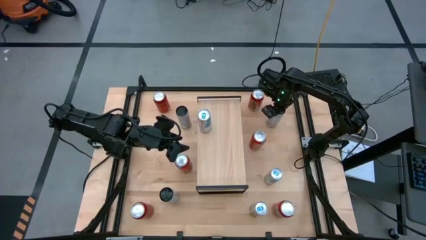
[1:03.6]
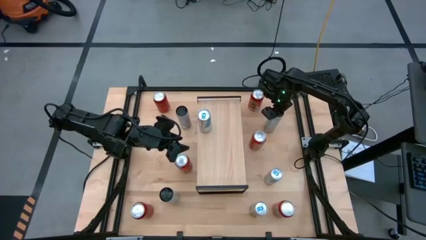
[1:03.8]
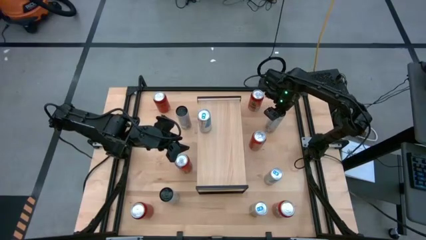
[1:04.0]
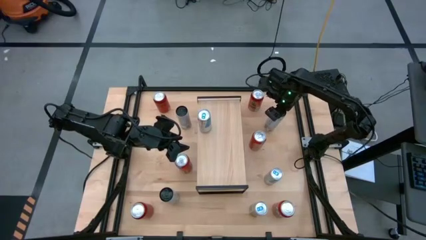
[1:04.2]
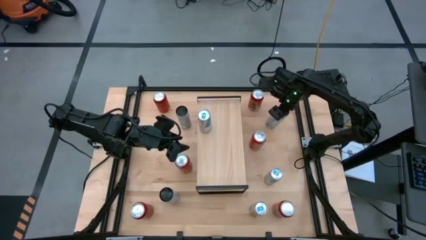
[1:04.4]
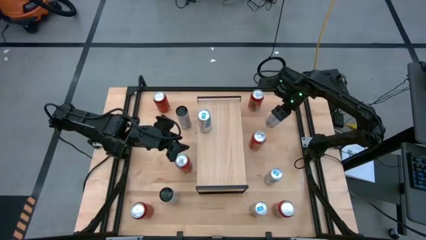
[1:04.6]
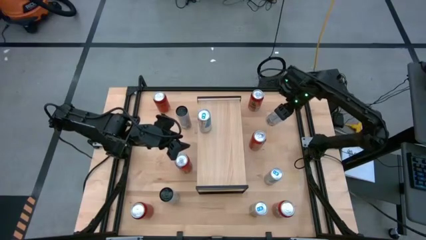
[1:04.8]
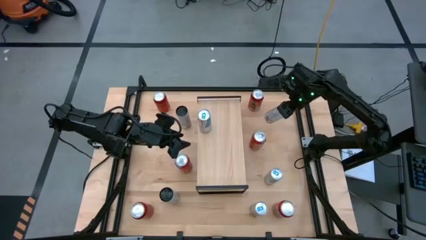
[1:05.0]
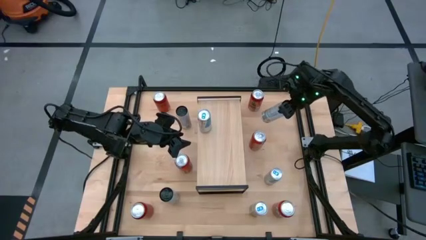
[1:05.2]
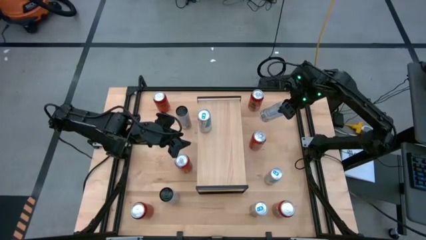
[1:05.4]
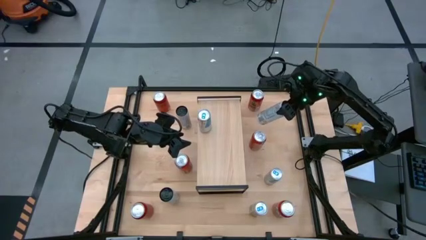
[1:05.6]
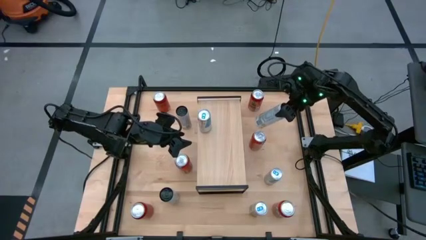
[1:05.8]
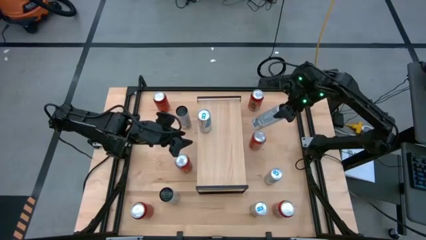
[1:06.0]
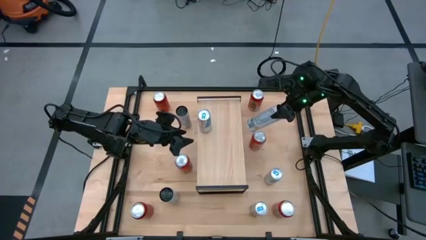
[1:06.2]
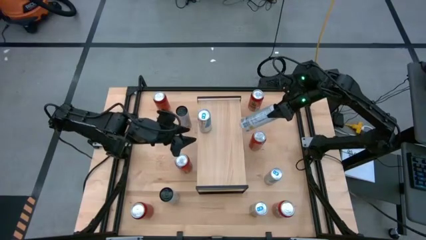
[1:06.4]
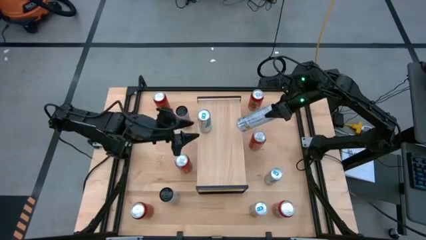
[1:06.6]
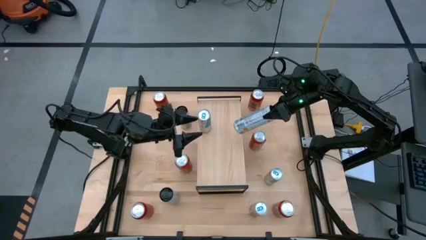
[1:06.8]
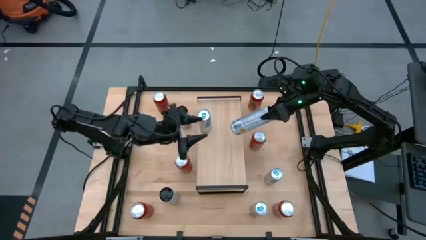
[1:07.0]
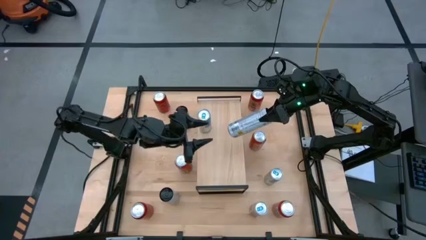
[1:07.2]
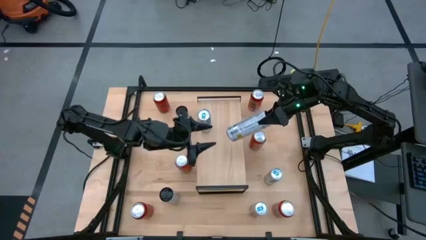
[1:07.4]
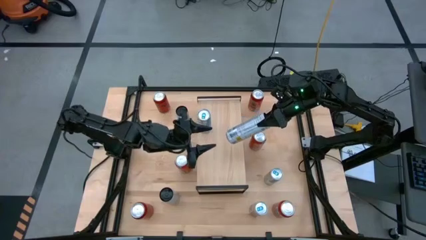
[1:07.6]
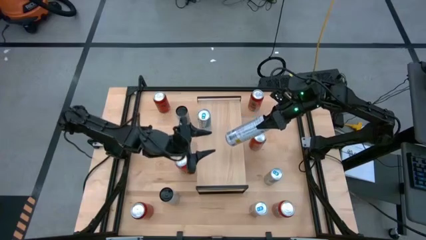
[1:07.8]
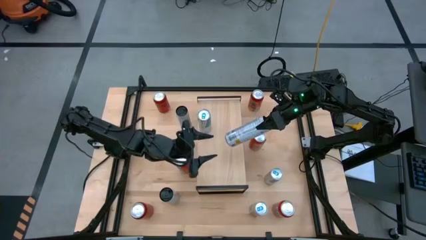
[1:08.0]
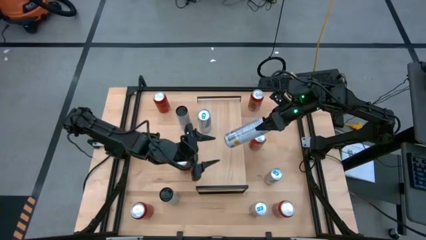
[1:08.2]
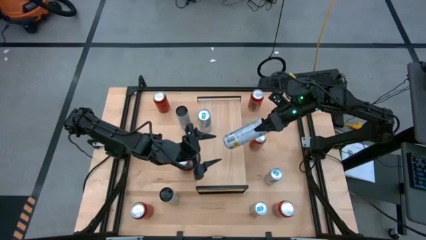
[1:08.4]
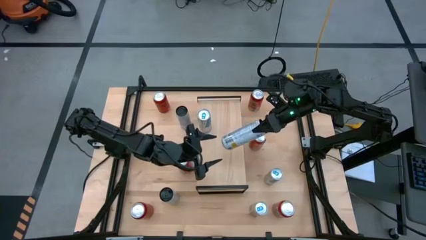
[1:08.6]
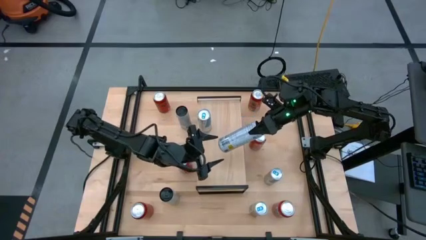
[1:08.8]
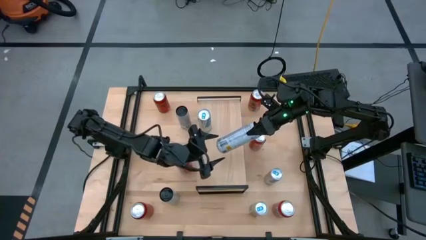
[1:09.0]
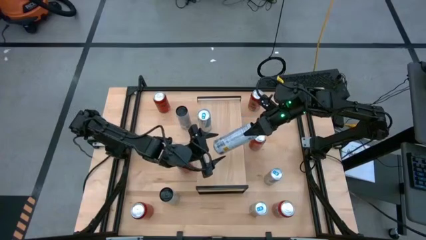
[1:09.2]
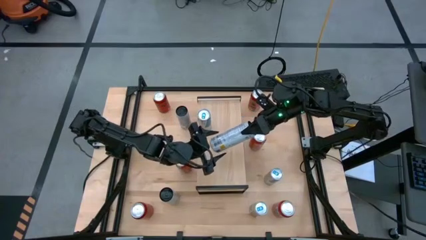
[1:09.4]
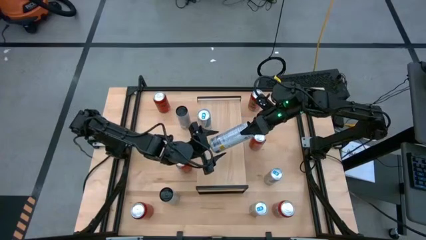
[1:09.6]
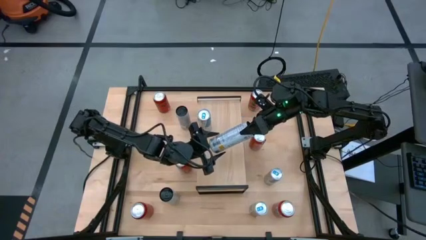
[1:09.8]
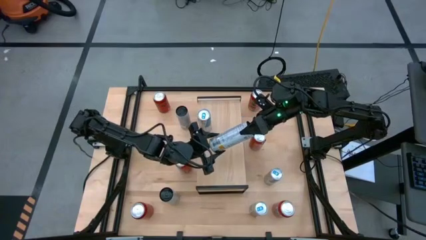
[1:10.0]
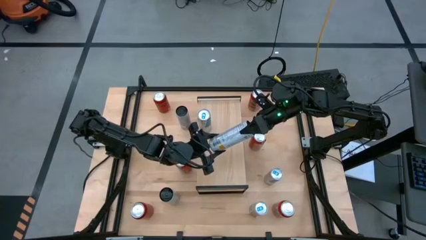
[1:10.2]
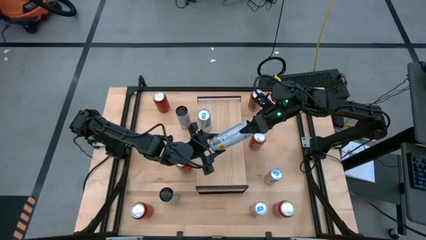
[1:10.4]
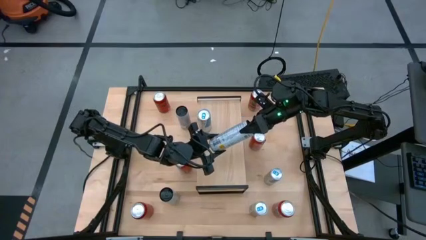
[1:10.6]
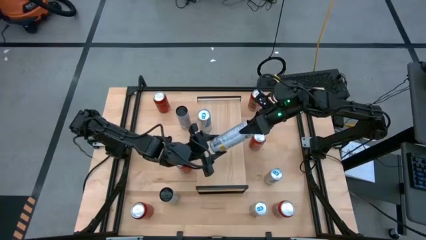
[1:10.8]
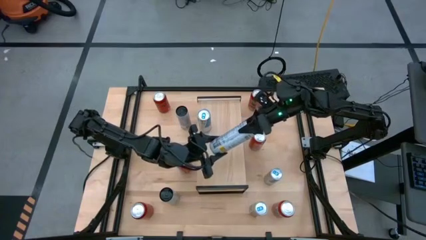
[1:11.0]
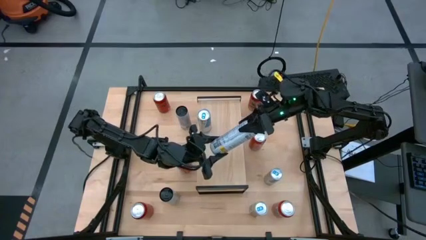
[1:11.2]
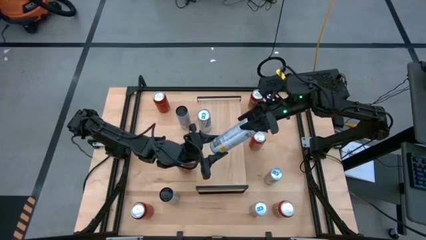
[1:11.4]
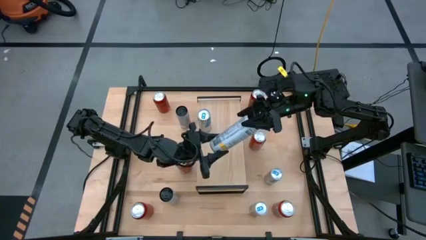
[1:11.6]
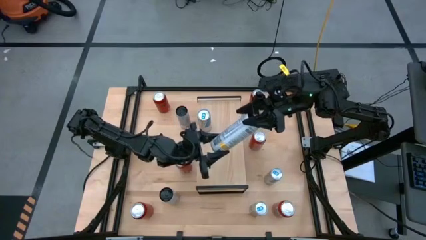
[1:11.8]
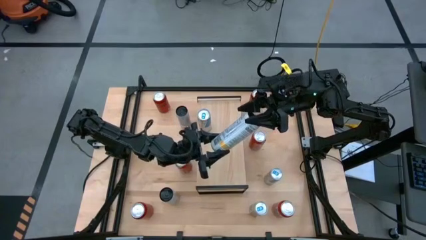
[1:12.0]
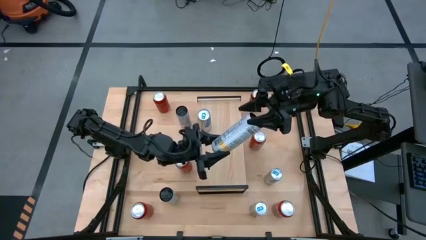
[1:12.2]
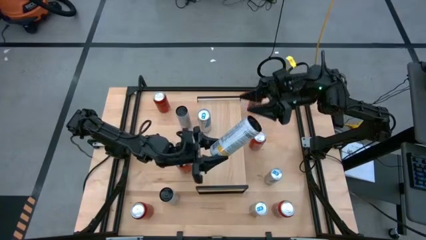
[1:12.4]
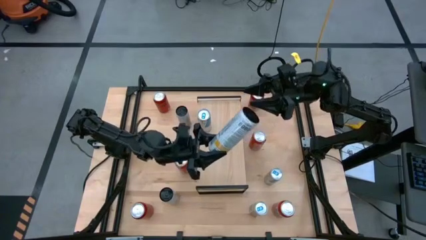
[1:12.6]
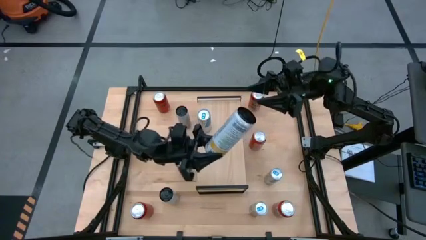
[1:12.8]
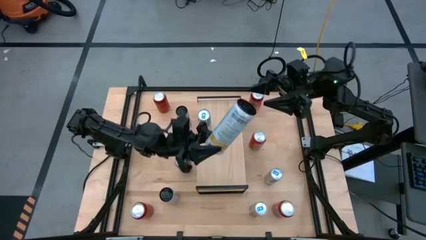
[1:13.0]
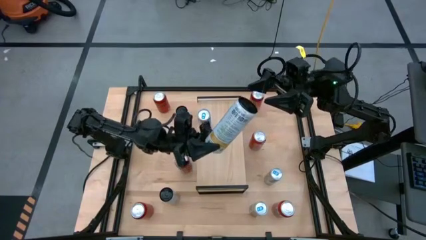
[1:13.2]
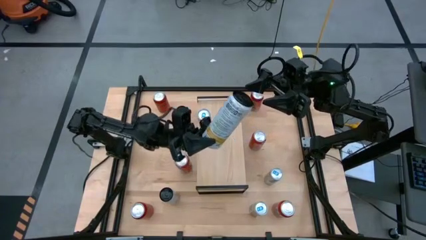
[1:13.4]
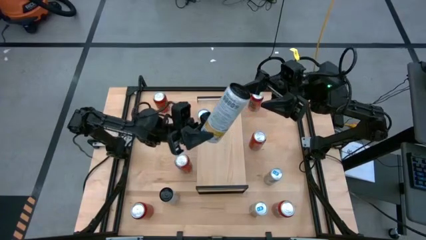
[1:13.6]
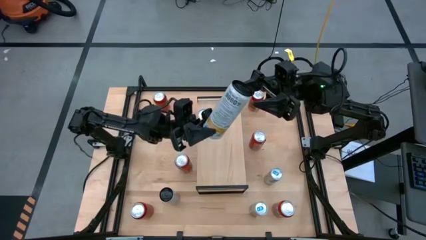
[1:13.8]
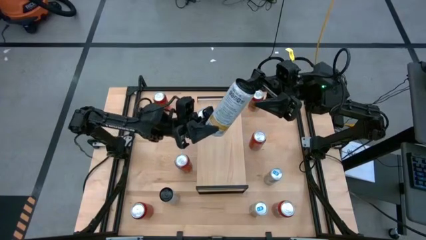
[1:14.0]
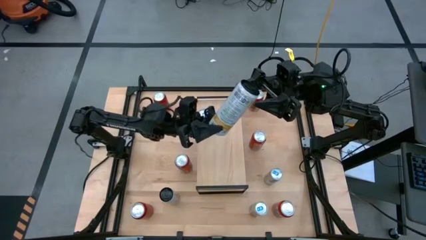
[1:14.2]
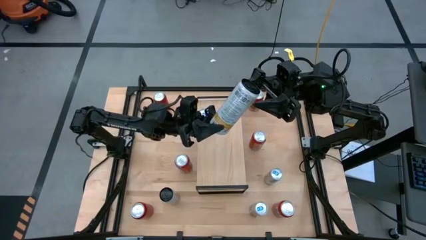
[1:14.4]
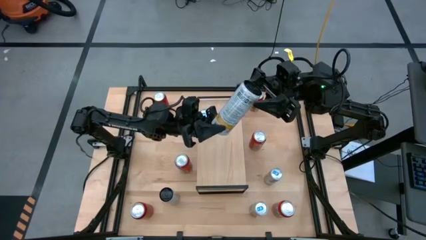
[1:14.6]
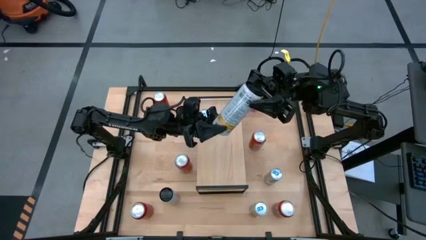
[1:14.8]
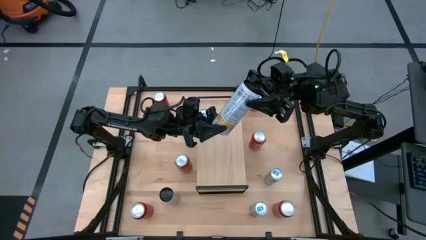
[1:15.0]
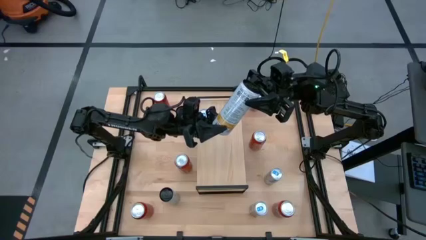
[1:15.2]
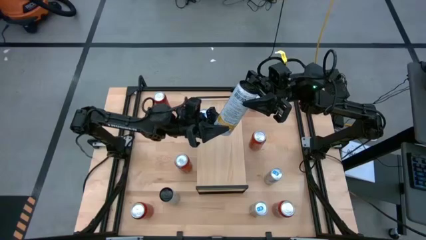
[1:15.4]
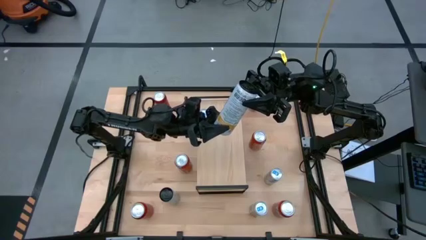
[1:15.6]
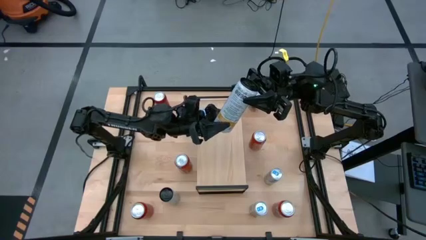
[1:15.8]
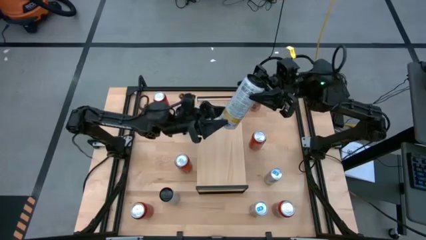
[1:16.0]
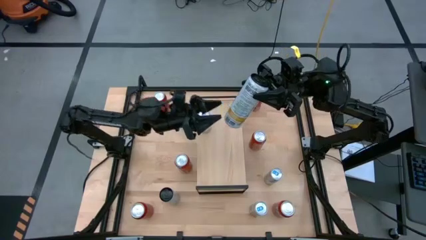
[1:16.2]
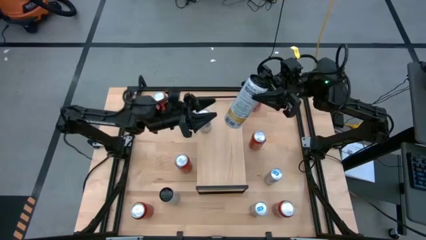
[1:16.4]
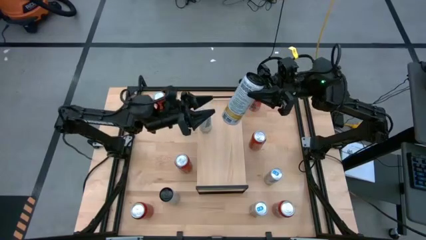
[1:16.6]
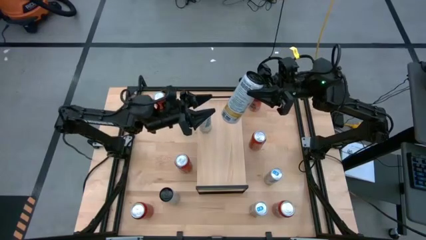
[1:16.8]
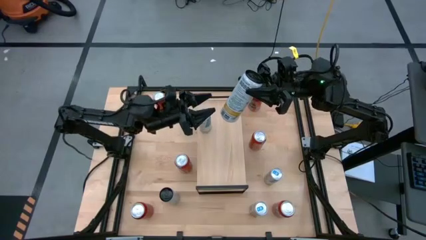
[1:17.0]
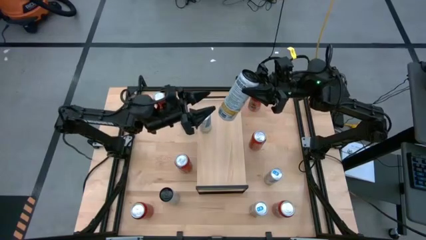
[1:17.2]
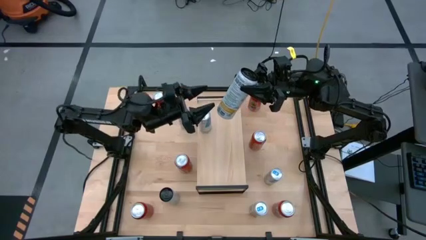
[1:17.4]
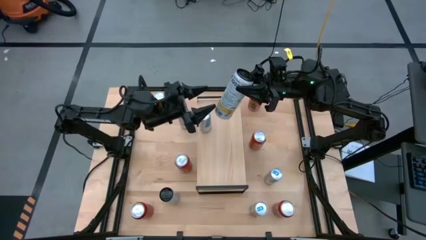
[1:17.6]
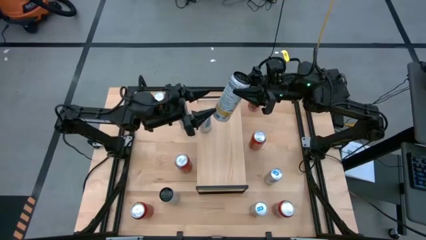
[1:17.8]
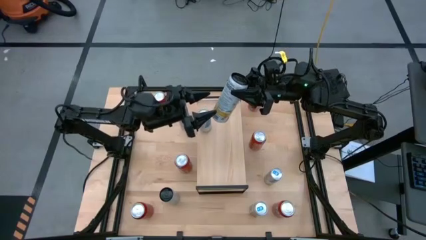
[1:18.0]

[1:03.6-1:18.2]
Task: Place canned beverage on shelf
Put the top right white and yellow soda can on the shelf
